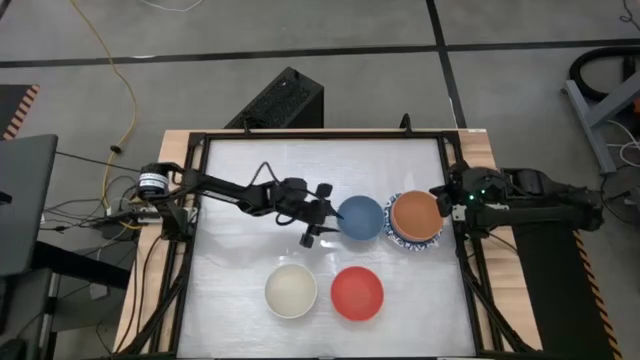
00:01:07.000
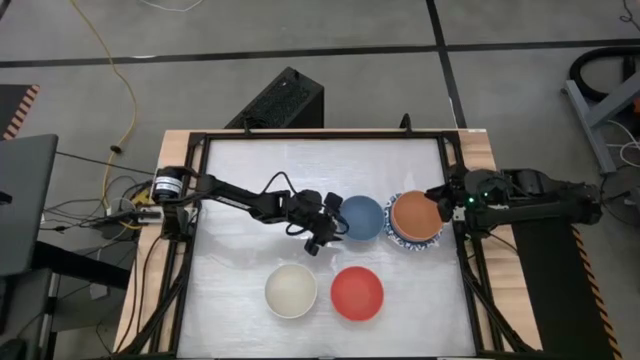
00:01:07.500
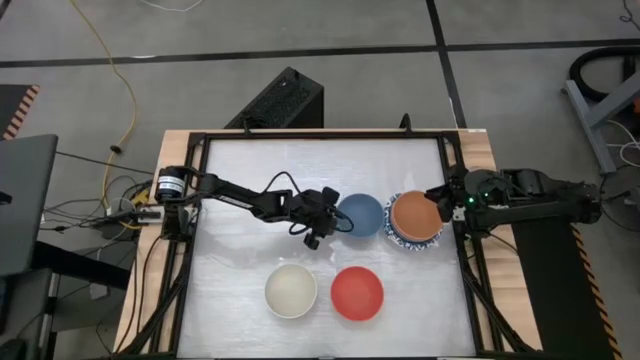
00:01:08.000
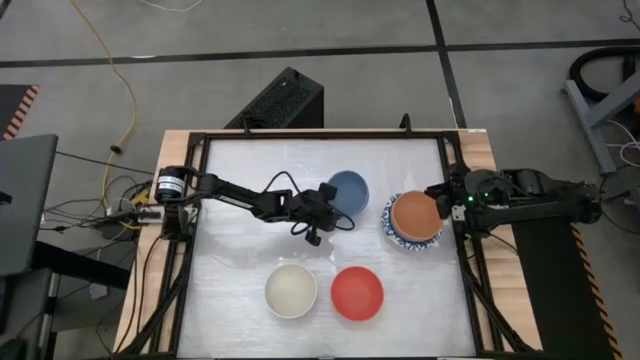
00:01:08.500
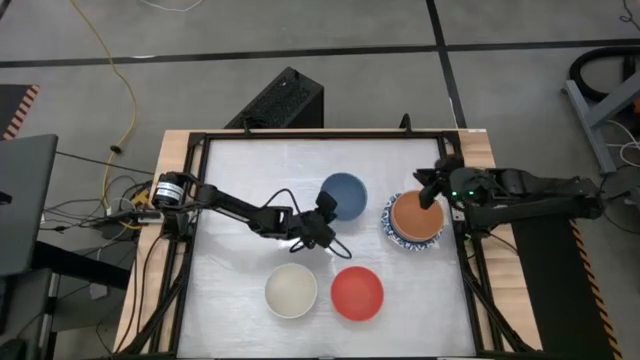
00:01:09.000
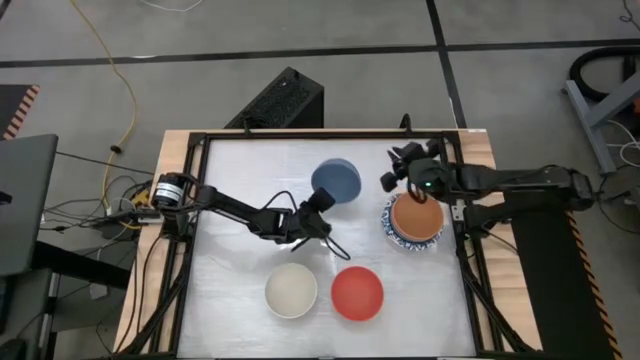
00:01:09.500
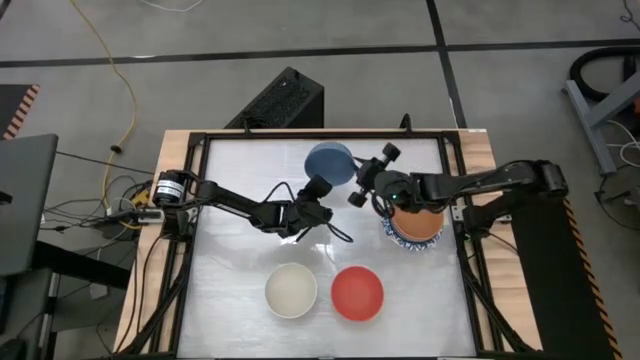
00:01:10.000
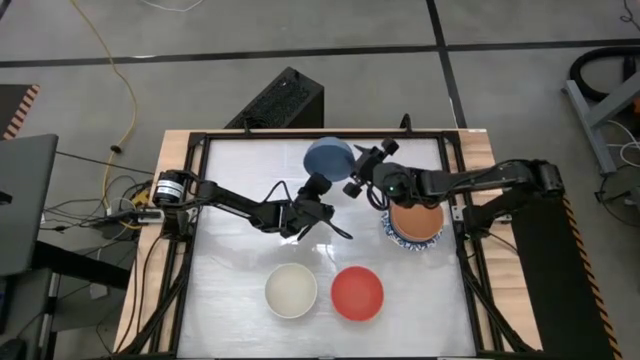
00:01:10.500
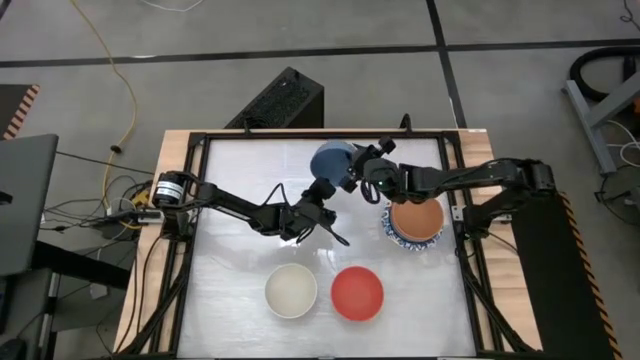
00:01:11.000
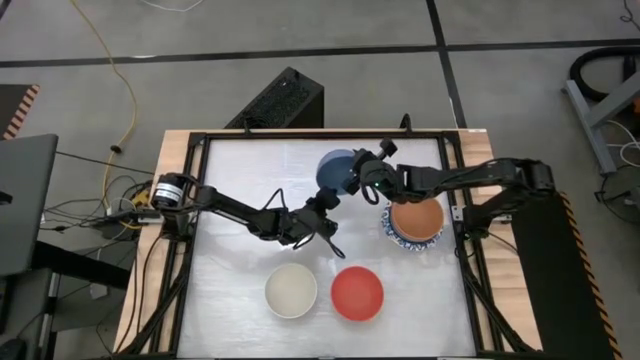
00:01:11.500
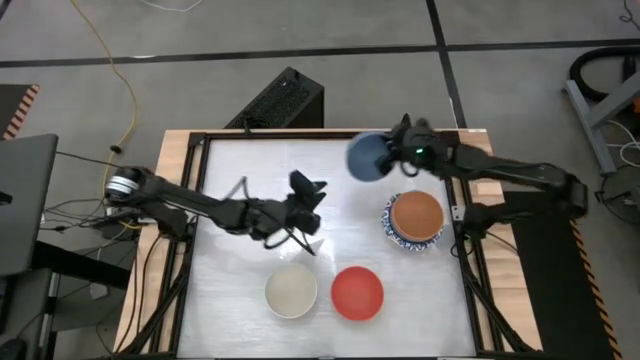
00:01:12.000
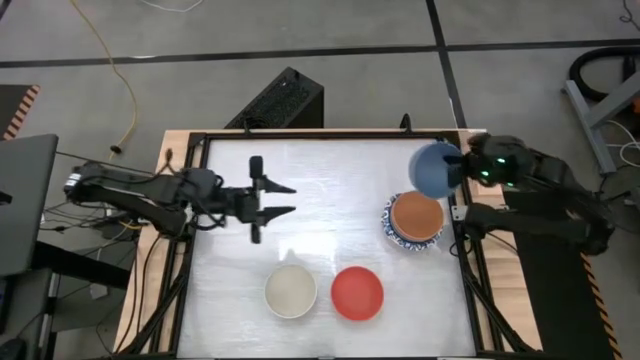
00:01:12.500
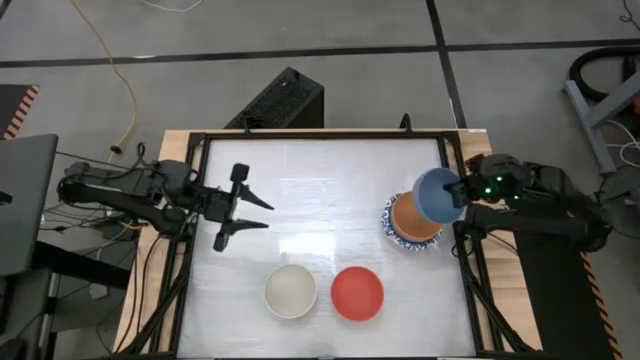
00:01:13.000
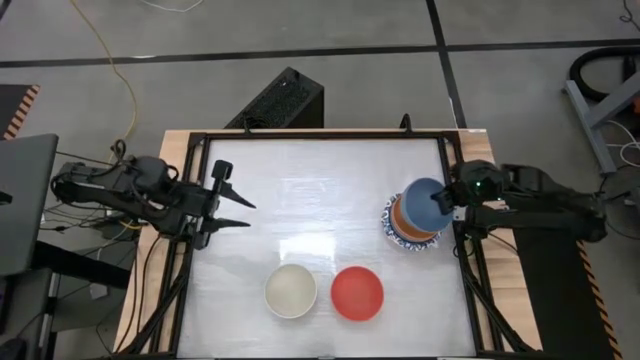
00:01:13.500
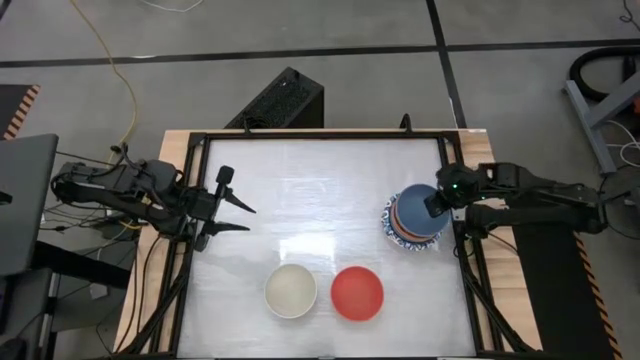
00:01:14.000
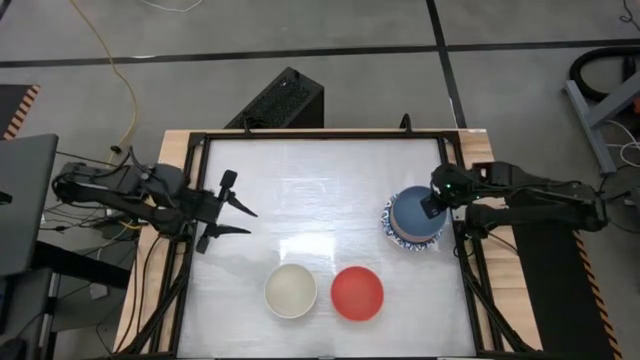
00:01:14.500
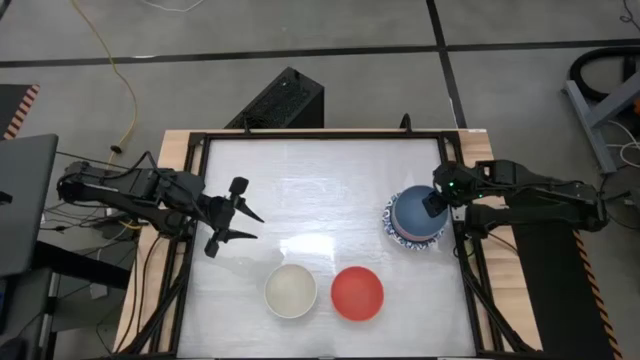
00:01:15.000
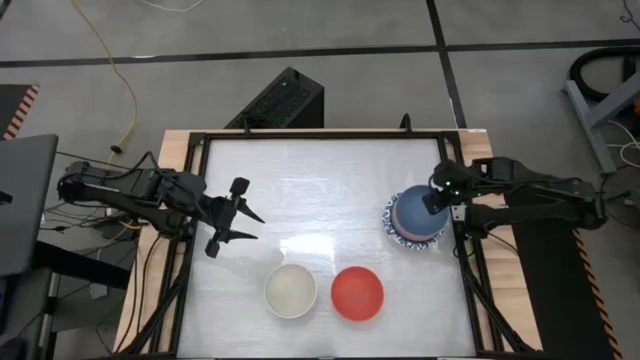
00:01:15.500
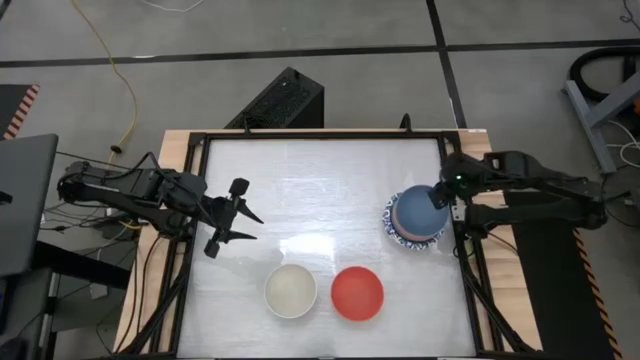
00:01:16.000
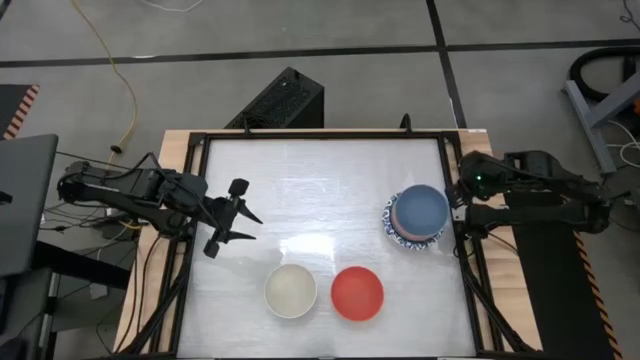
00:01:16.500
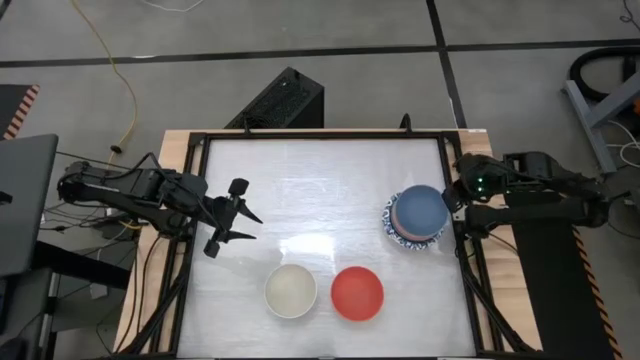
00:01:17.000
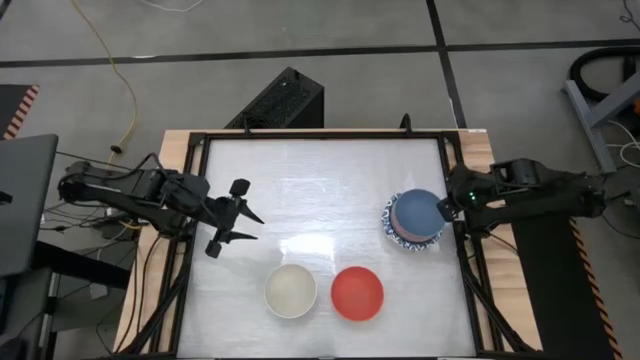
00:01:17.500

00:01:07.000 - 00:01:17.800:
Stack the blue bowl on top of the brown bowl

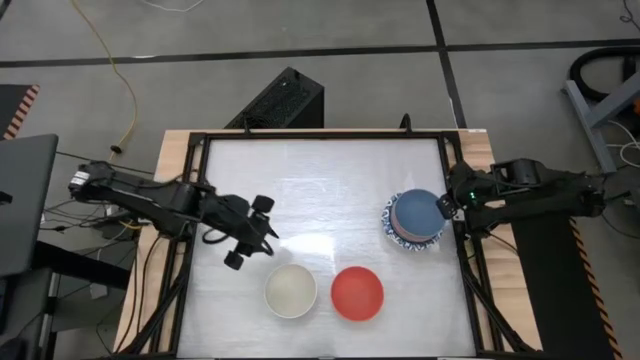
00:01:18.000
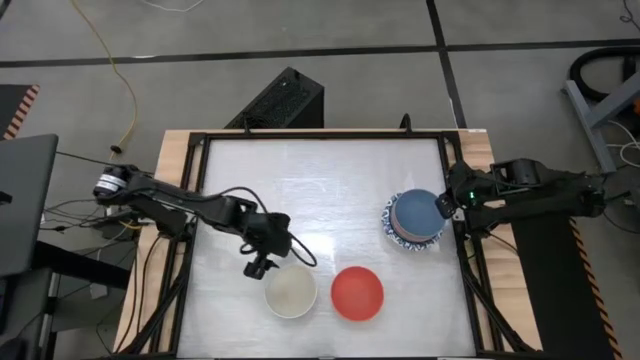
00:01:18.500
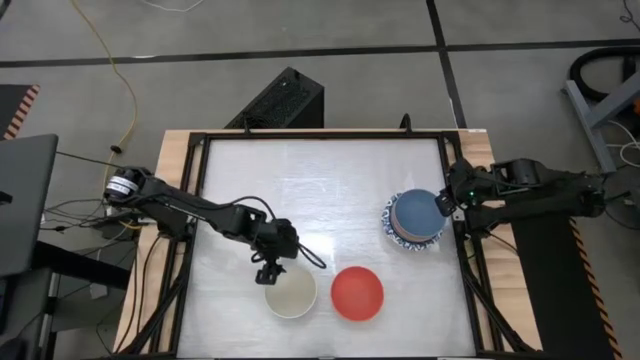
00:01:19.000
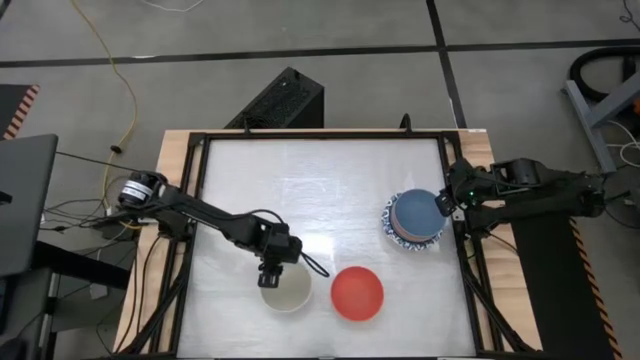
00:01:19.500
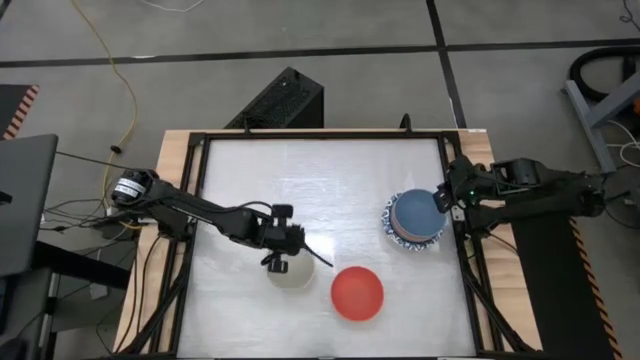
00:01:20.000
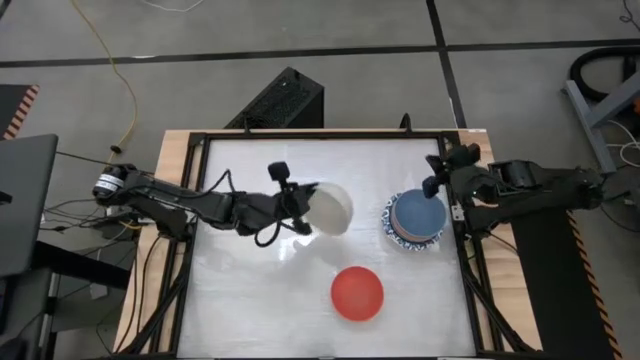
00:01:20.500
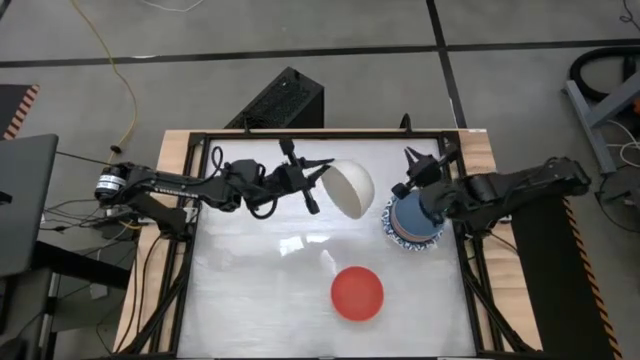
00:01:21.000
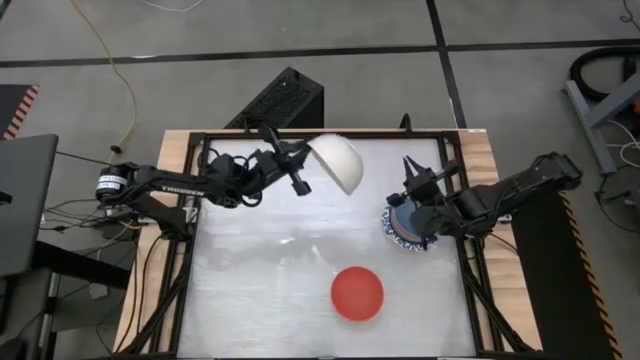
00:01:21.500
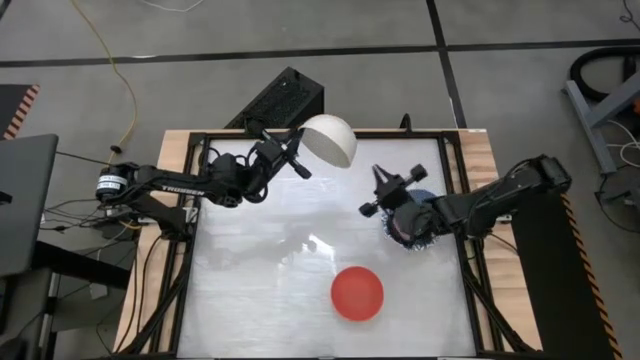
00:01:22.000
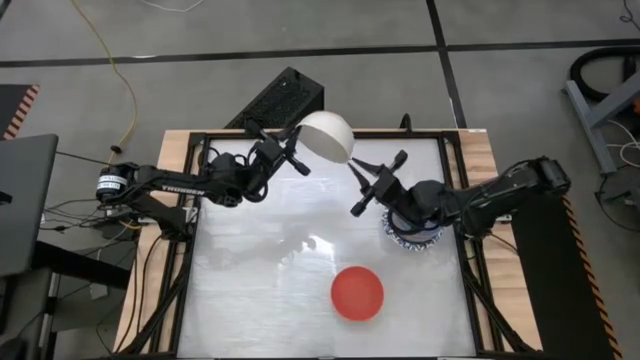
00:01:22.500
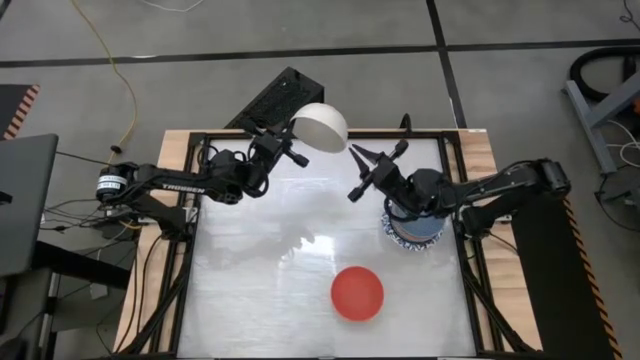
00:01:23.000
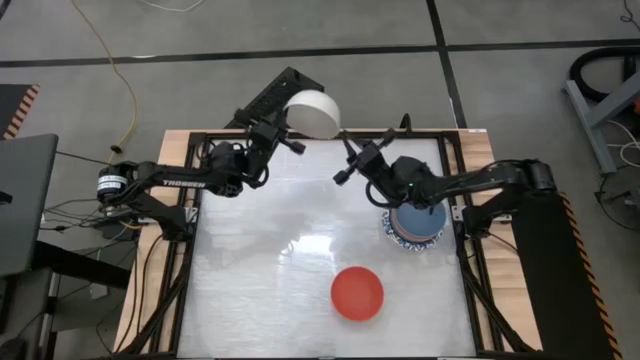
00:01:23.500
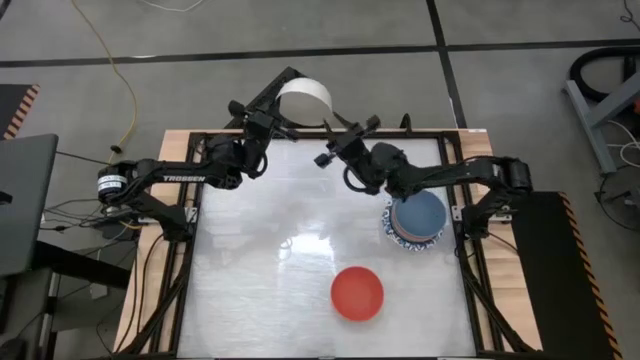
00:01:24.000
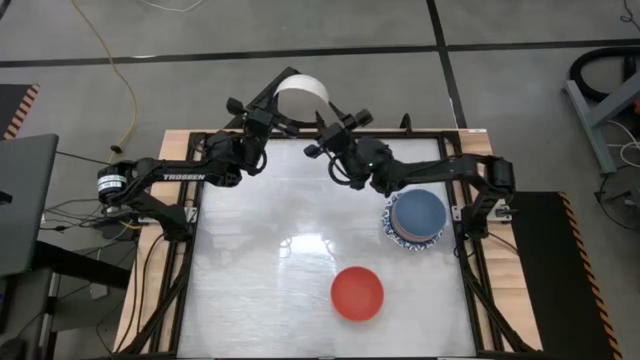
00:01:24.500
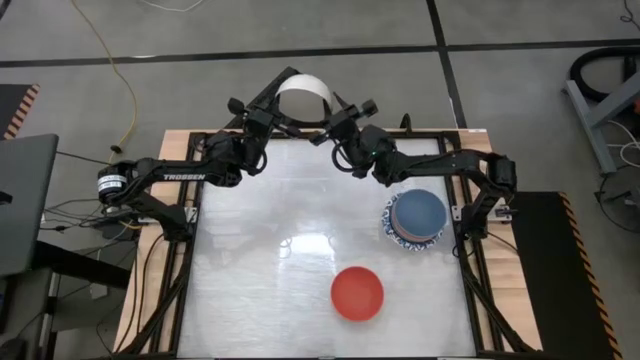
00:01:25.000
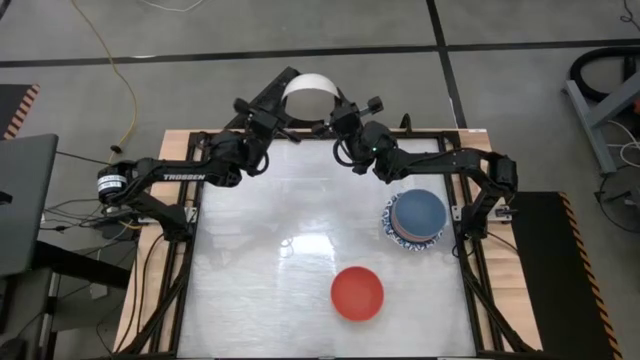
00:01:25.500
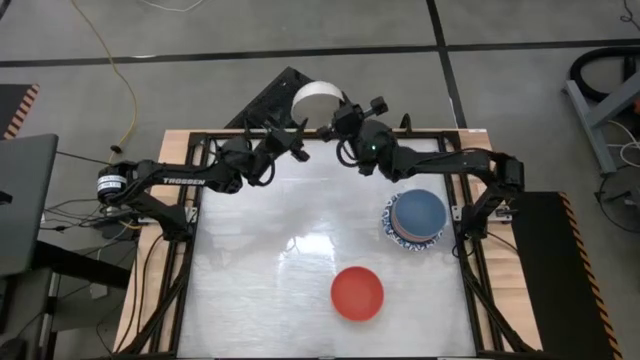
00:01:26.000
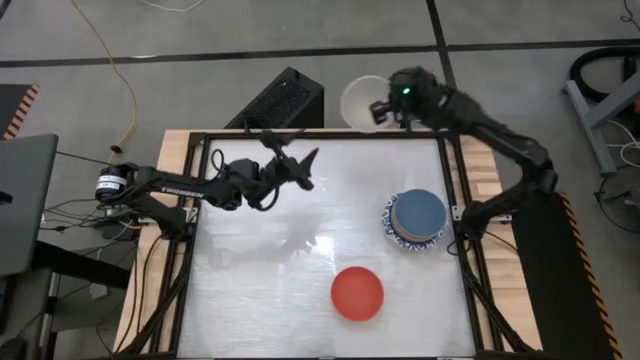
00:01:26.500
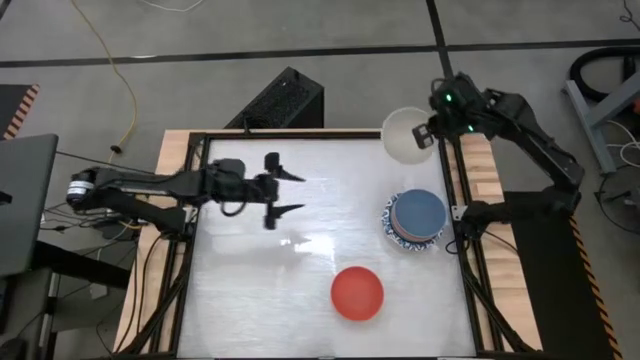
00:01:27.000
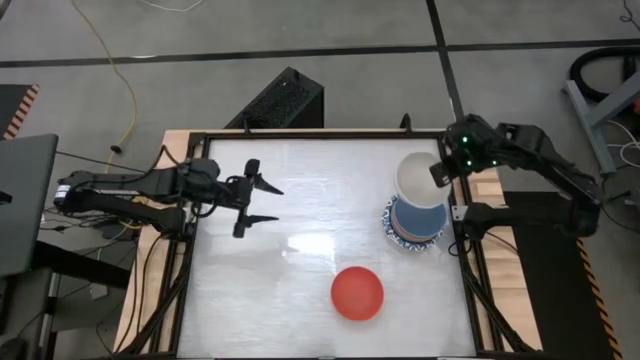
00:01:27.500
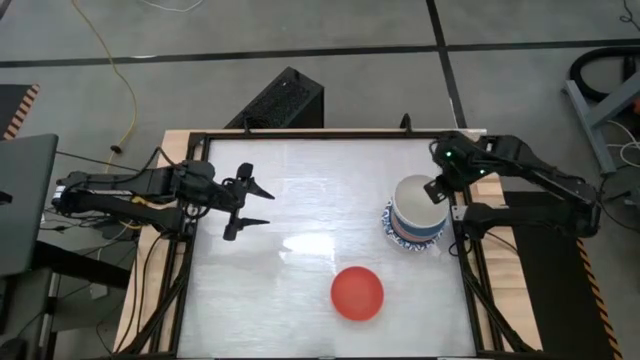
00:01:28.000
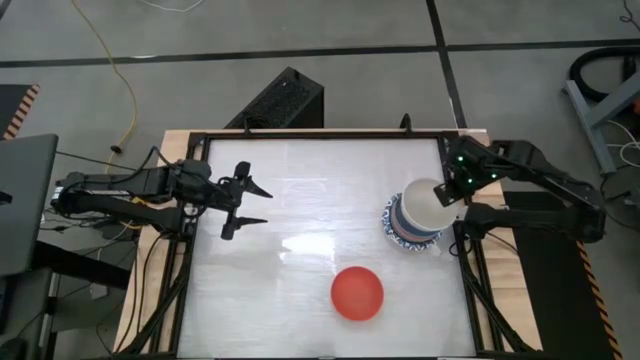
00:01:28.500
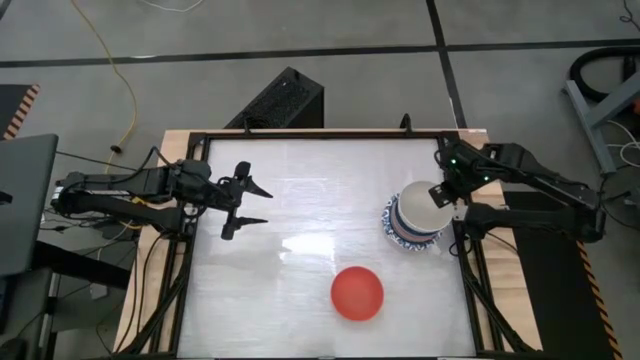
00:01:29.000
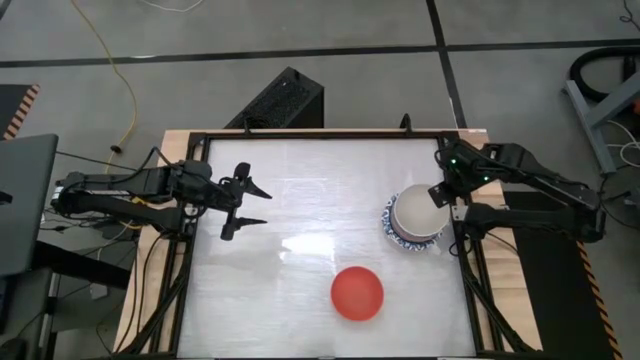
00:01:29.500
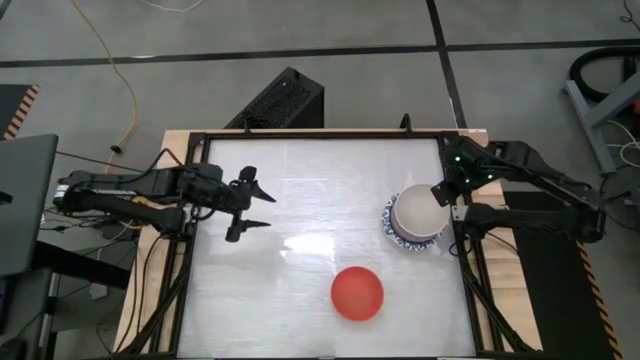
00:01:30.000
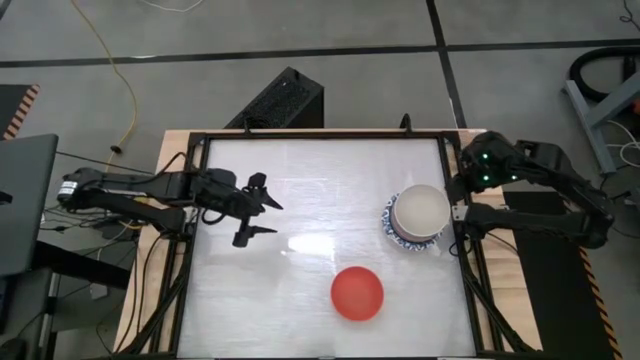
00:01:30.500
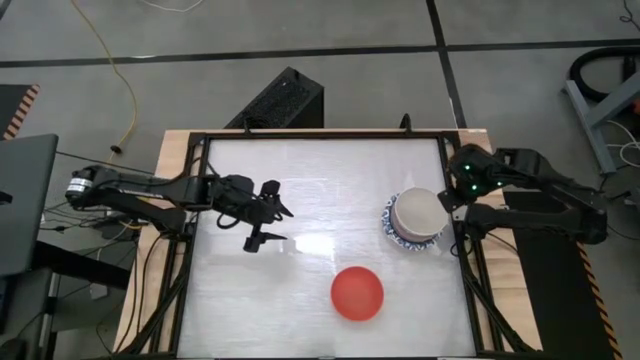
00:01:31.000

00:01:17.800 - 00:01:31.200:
Stack the white bowl on top of the blue bowl
